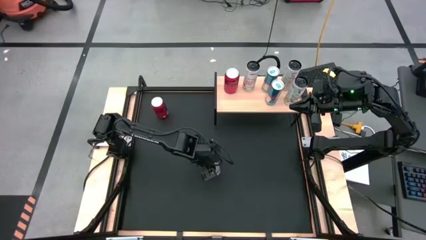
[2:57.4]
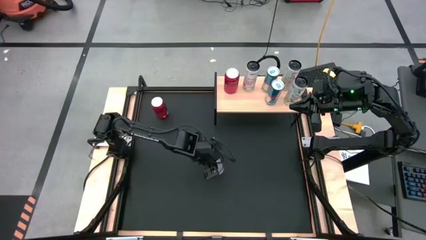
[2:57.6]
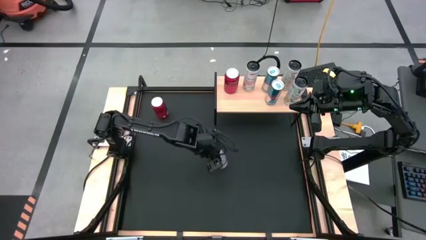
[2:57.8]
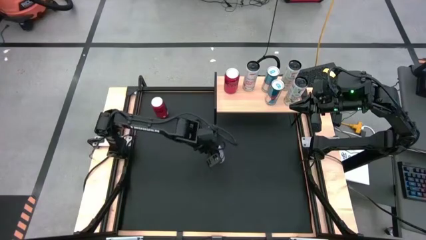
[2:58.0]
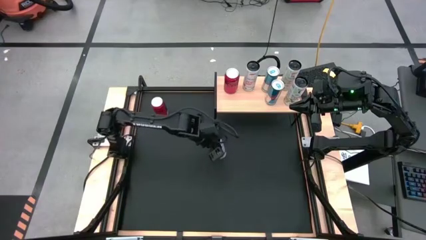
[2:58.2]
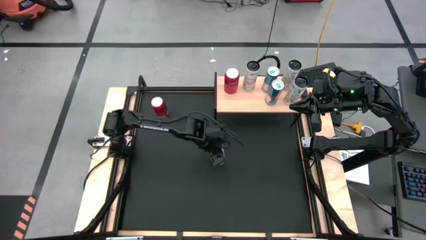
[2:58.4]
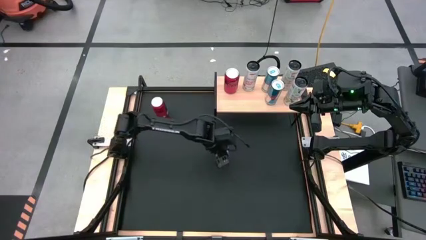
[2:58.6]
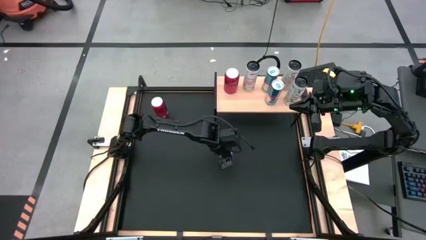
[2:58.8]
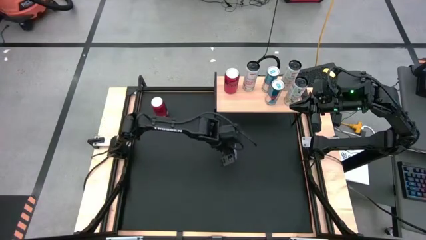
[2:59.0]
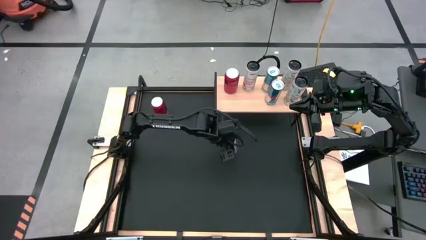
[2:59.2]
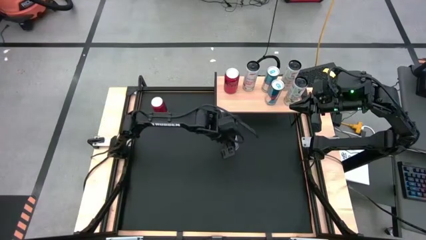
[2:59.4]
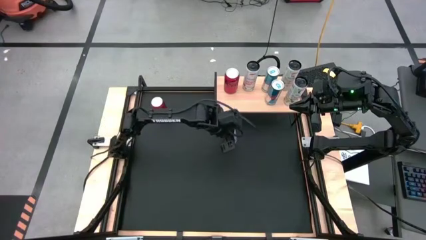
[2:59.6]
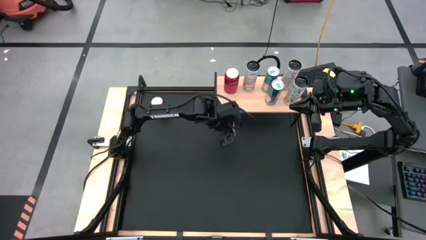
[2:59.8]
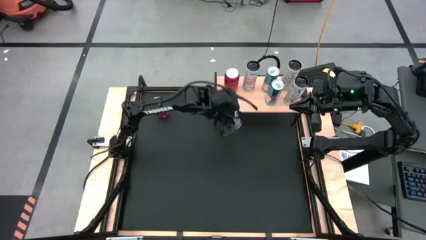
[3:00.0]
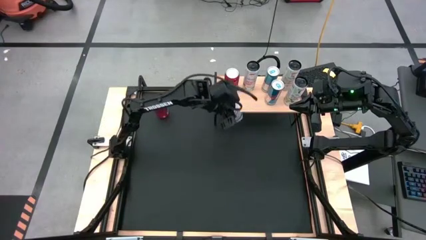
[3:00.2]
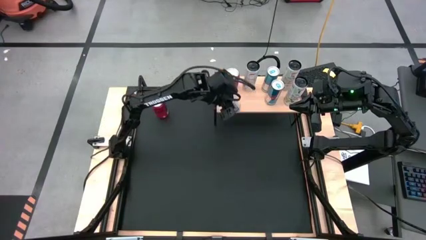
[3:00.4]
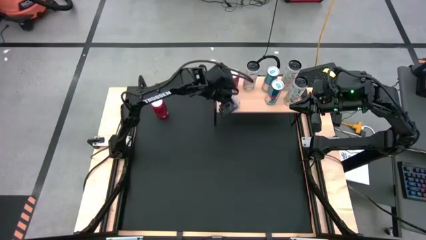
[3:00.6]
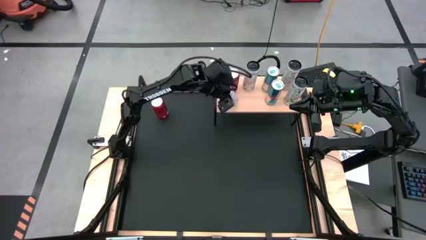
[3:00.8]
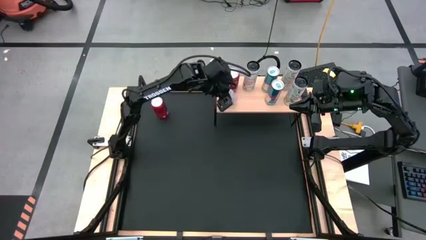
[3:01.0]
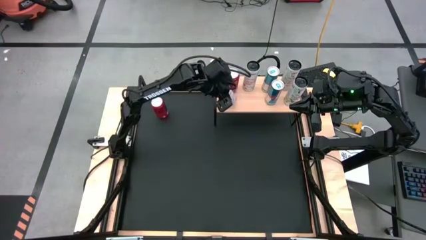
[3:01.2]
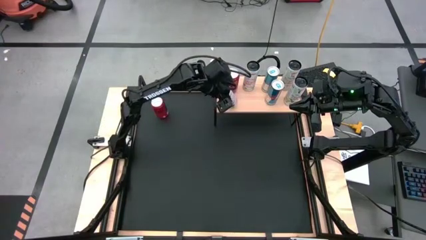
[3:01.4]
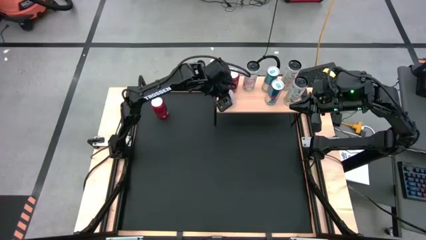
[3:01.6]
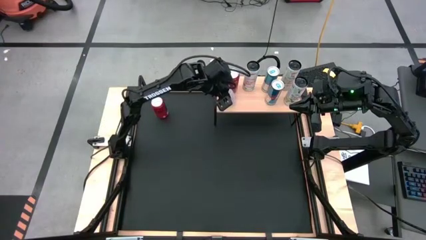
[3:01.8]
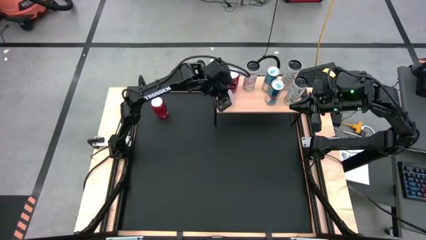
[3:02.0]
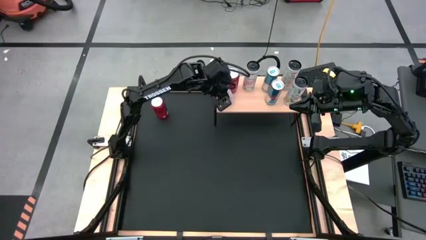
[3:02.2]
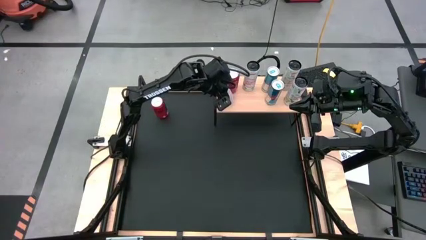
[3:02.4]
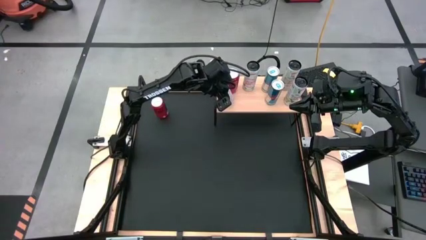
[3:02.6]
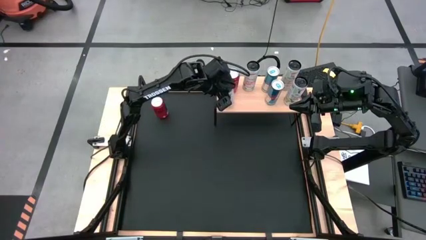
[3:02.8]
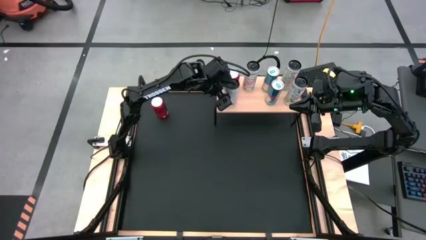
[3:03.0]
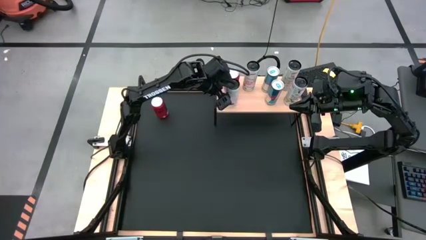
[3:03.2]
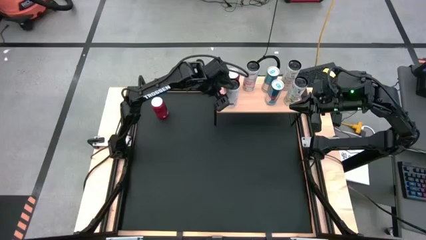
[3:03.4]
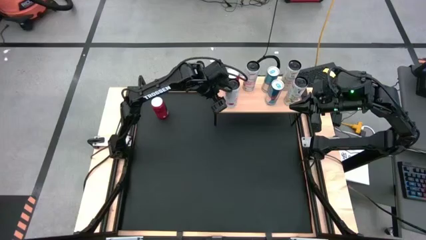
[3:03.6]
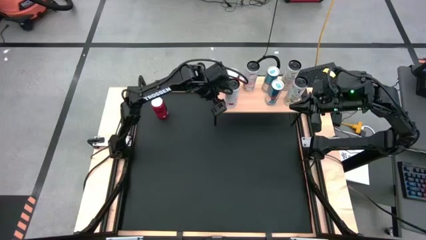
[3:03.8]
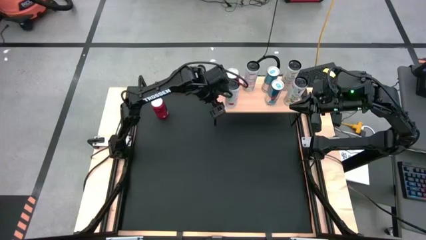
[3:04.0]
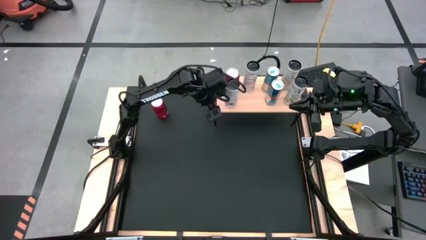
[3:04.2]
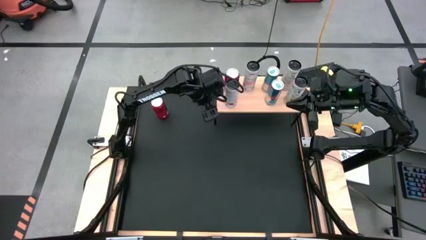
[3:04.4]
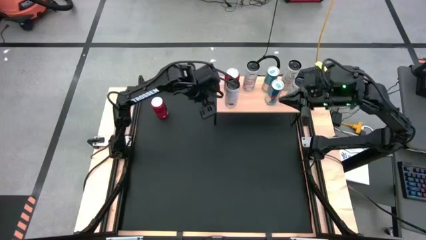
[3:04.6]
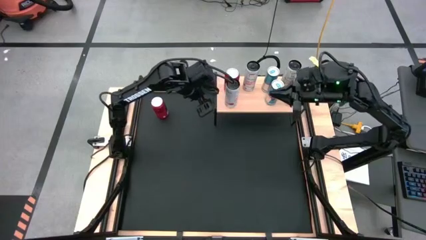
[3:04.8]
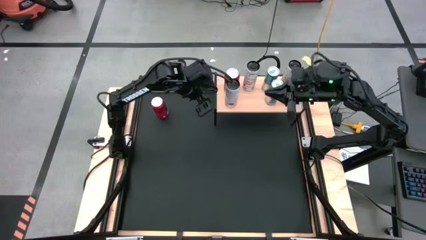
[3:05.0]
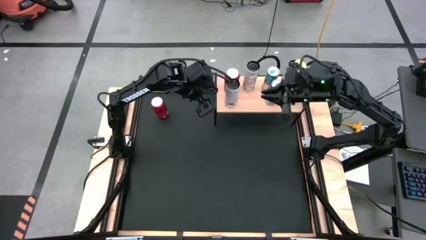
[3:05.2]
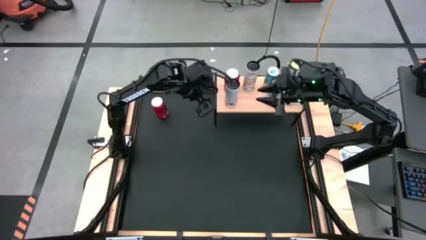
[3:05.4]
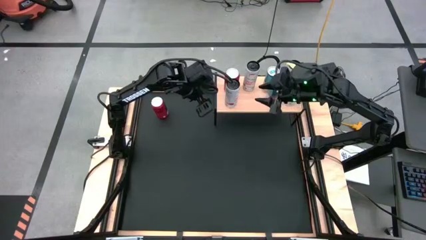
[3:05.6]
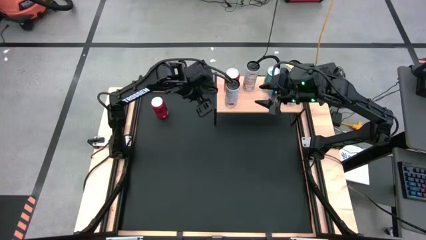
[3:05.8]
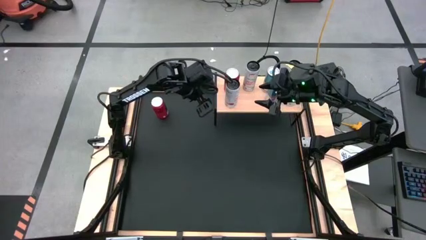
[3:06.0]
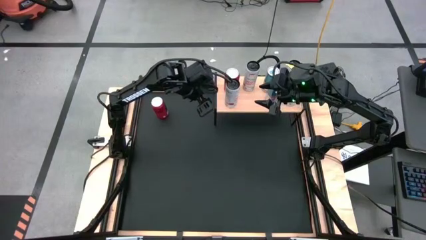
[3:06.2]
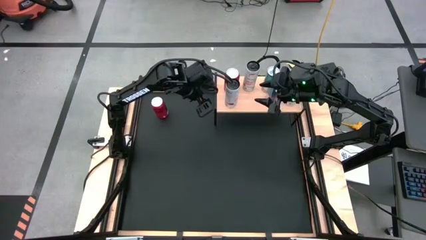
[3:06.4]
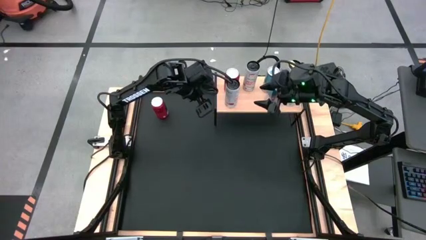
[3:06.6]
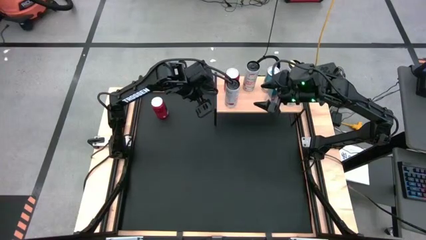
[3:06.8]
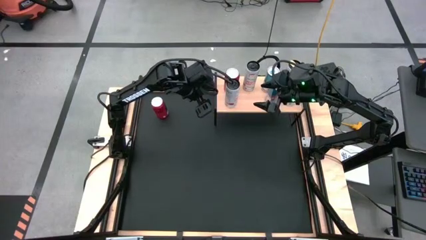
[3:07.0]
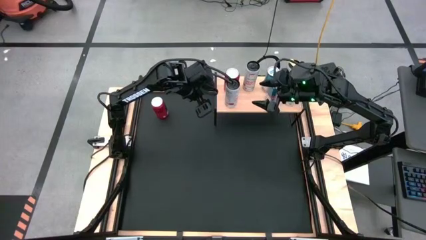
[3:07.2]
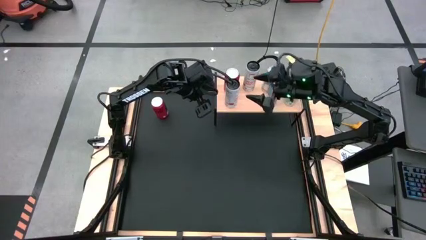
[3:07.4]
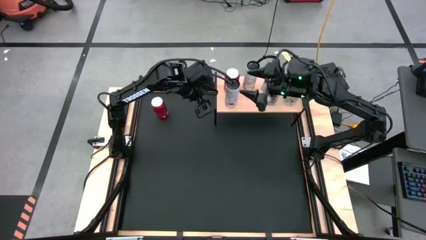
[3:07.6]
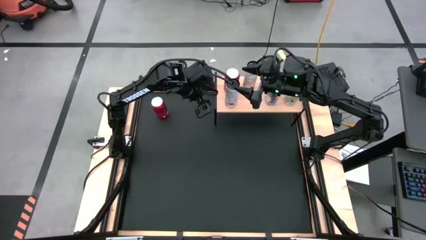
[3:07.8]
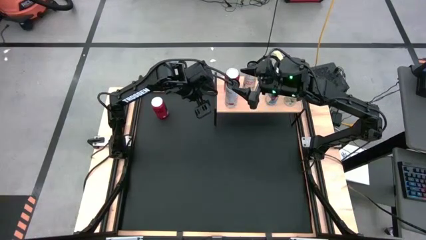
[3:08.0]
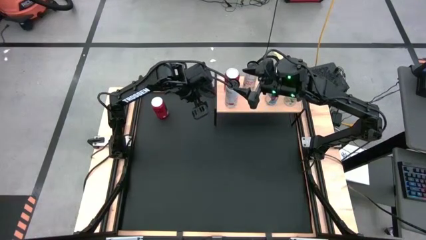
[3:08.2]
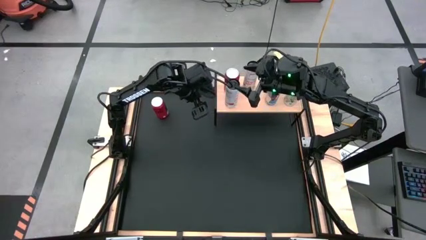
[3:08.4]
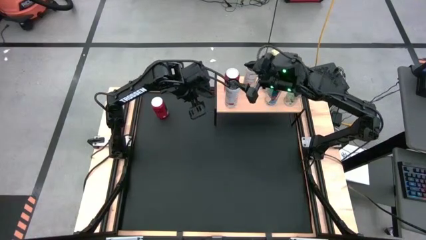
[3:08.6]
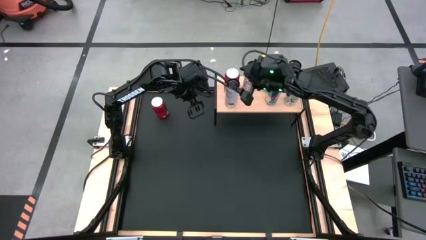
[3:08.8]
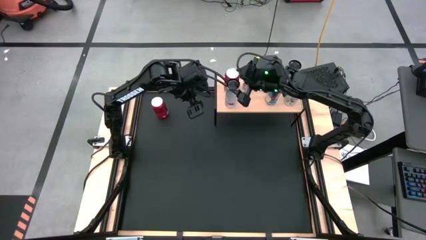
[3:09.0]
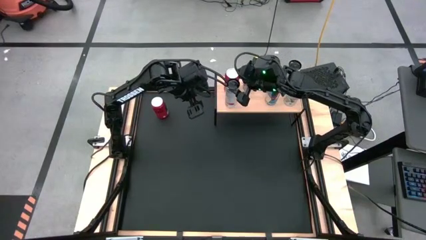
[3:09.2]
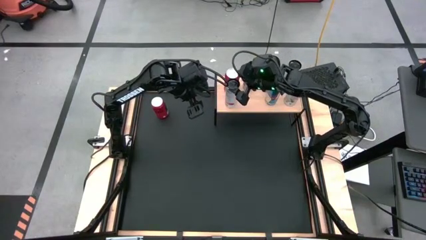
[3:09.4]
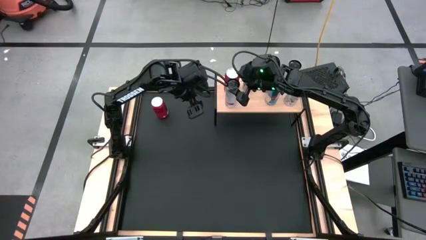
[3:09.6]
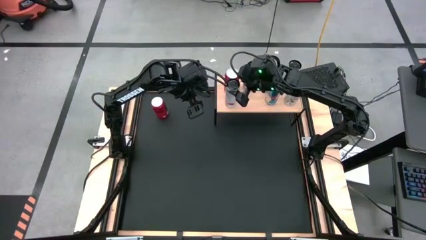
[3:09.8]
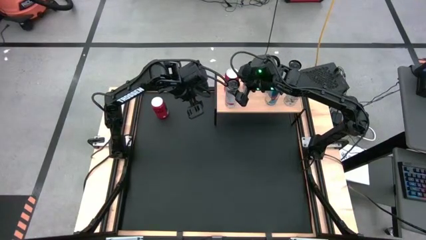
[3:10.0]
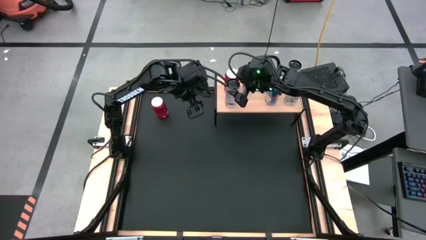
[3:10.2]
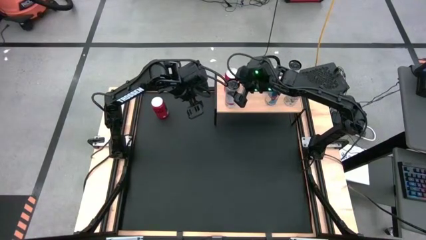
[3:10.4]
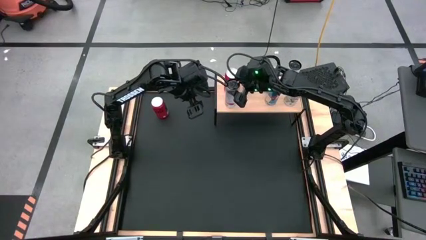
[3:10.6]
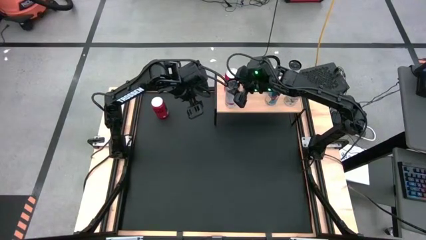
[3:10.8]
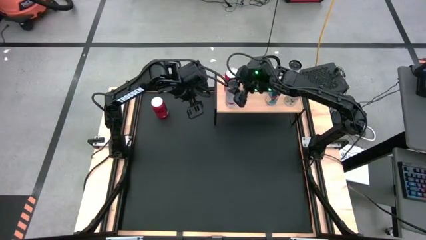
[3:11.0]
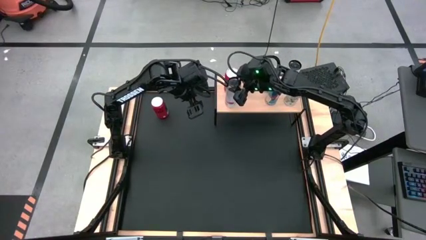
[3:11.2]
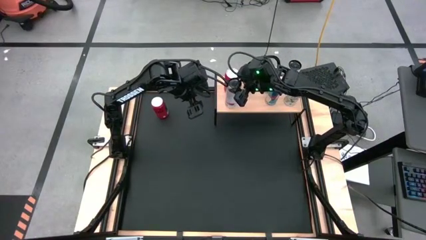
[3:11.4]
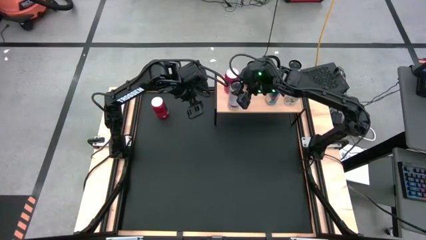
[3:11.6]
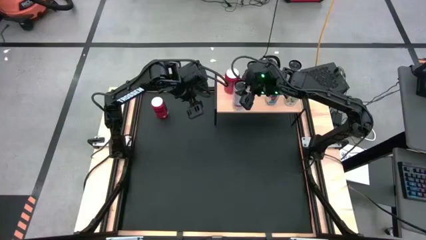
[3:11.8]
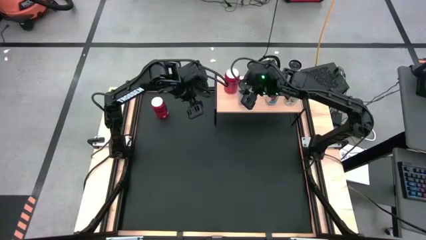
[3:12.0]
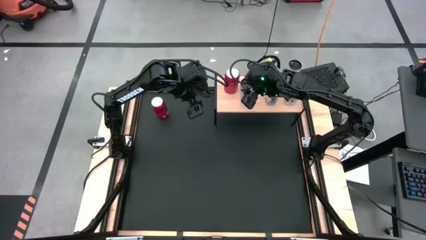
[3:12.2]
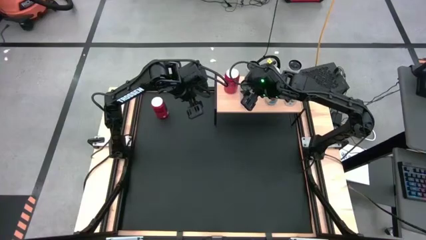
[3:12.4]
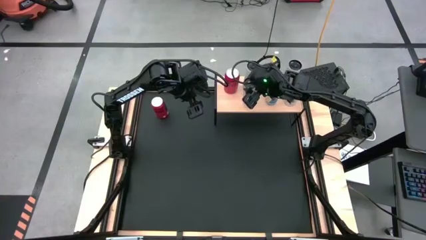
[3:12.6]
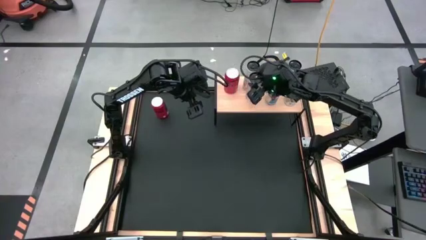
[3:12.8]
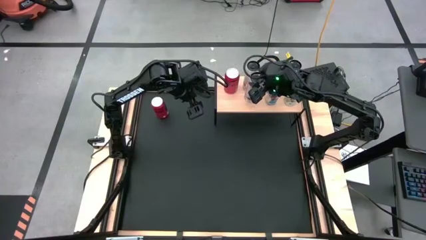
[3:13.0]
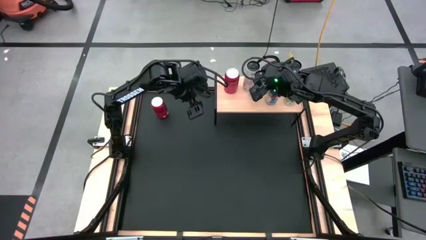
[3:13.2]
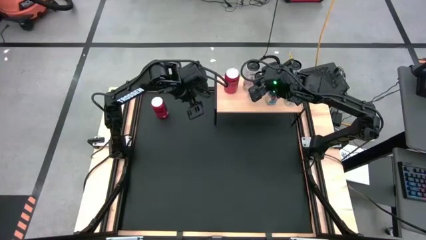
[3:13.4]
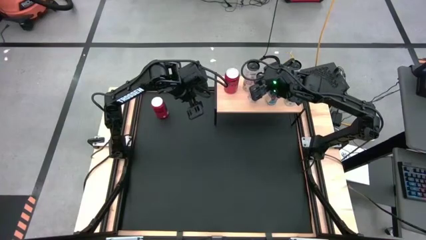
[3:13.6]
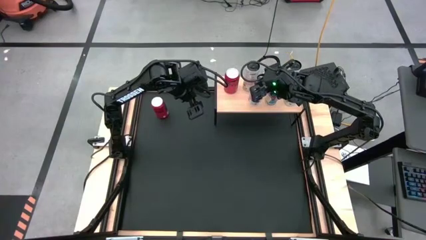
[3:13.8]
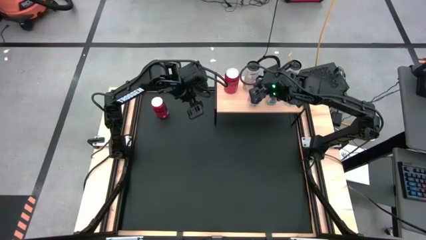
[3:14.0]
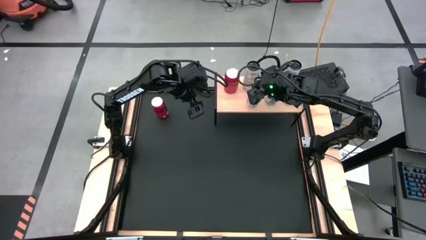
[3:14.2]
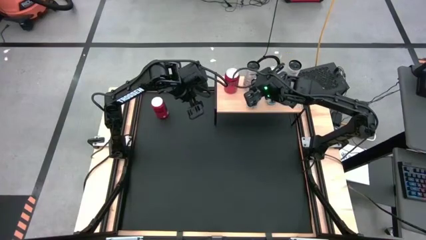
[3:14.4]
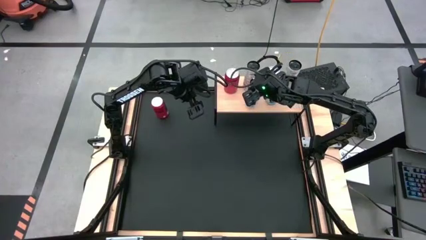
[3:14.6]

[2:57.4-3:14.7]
Task: Place canned beverage on shelf
Put the white-pink soda can on the shelf aligned with the other white-pink soda can
